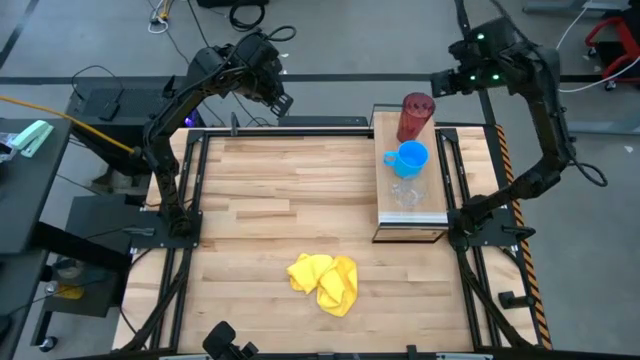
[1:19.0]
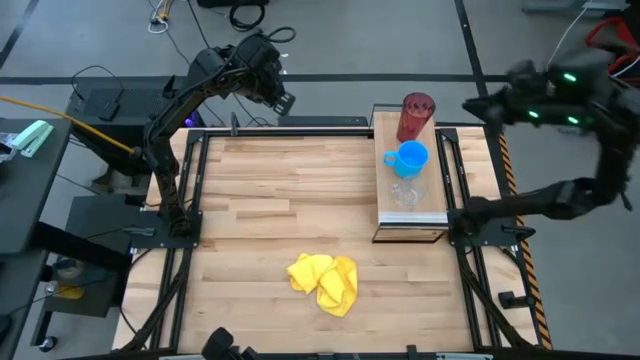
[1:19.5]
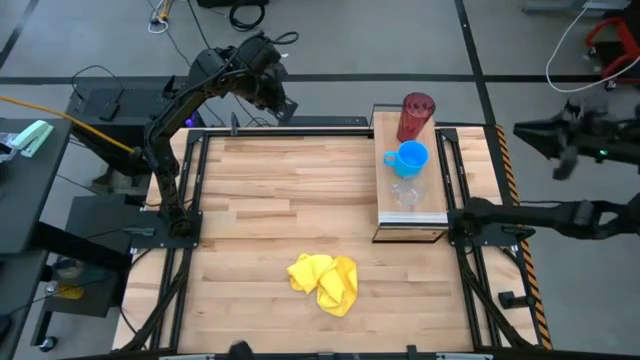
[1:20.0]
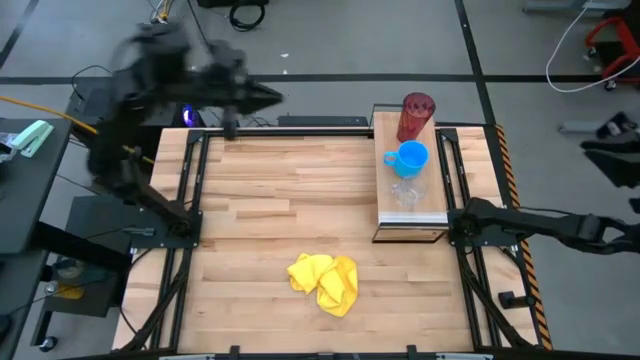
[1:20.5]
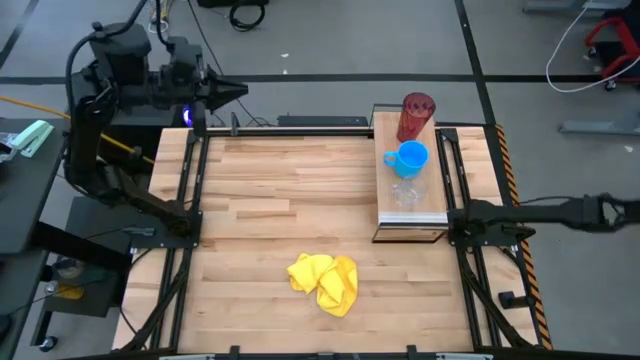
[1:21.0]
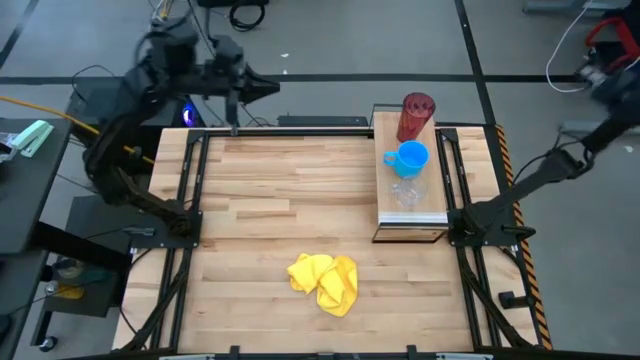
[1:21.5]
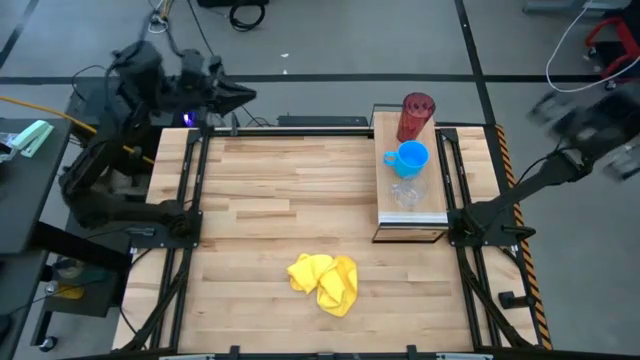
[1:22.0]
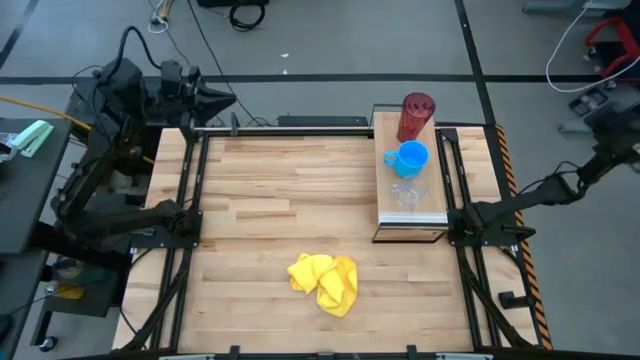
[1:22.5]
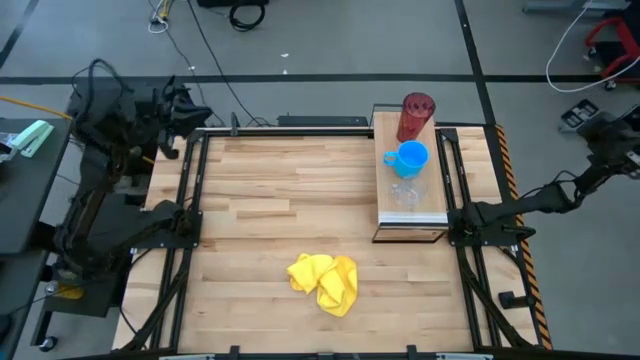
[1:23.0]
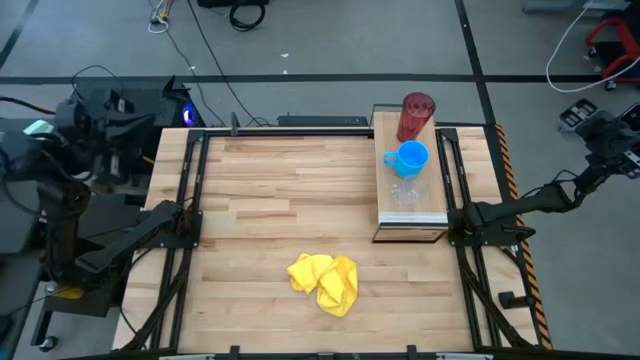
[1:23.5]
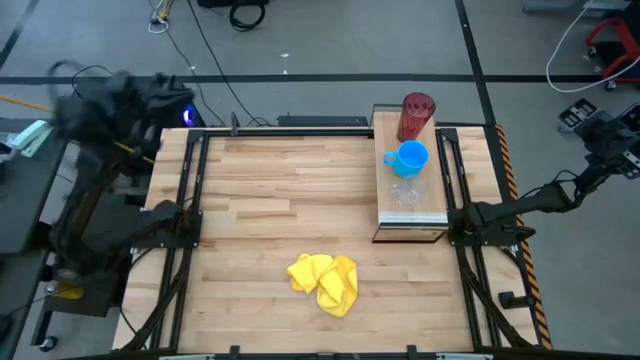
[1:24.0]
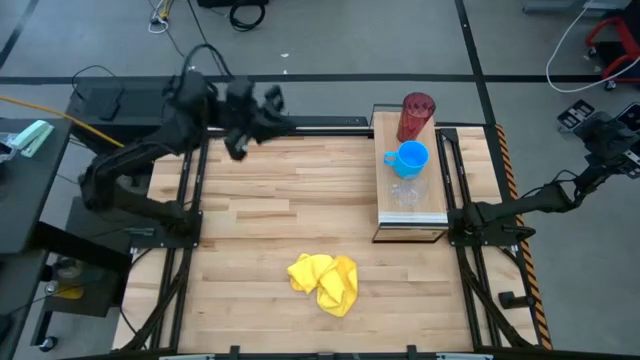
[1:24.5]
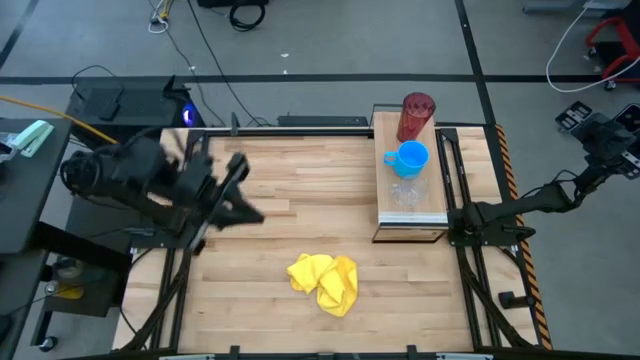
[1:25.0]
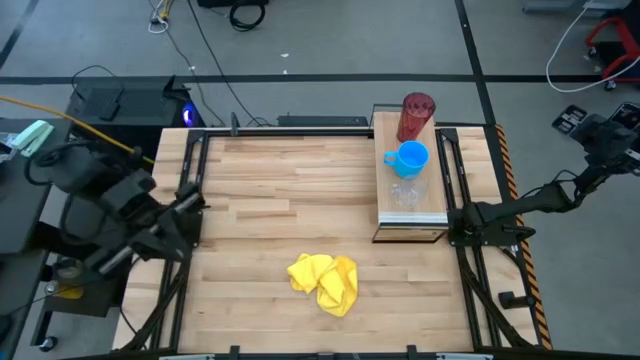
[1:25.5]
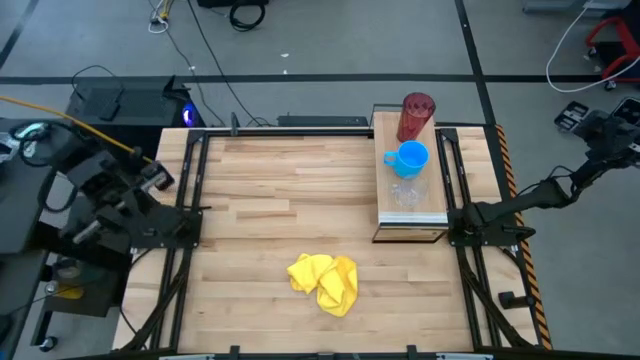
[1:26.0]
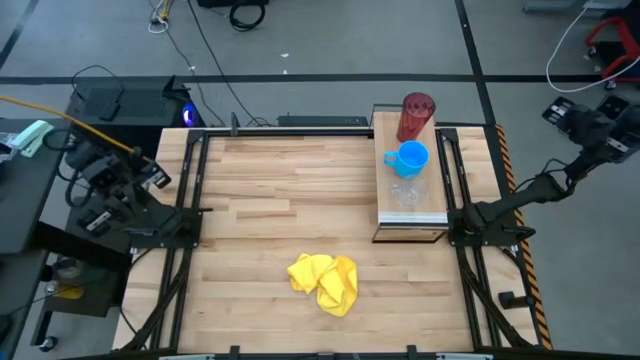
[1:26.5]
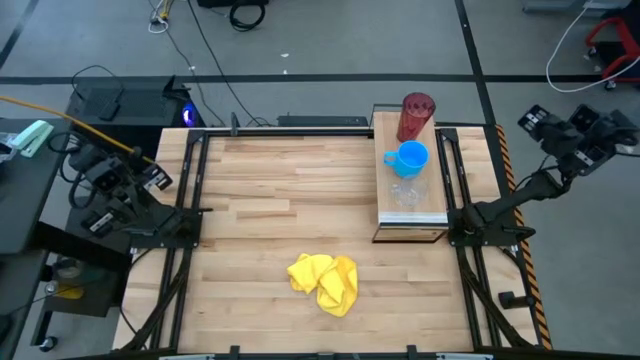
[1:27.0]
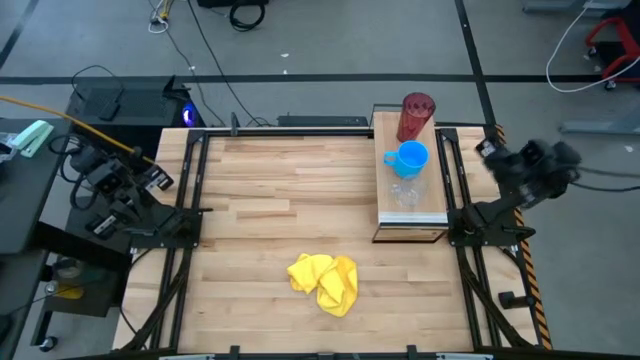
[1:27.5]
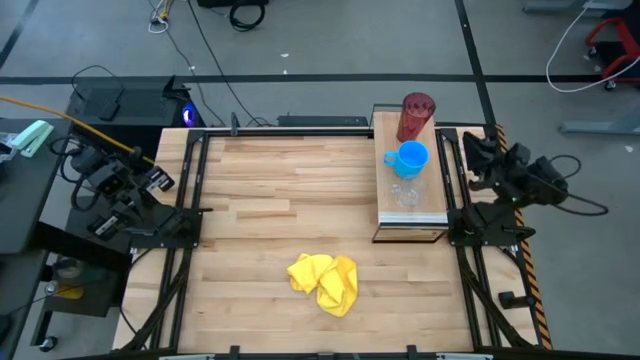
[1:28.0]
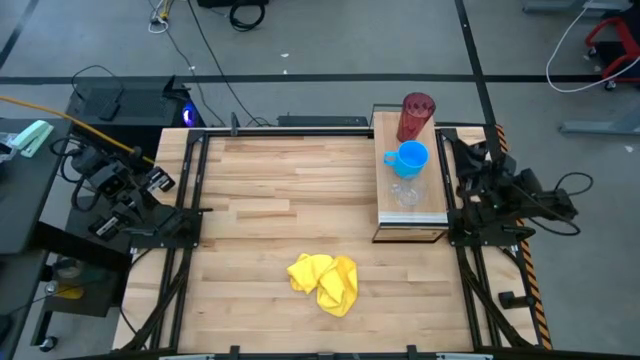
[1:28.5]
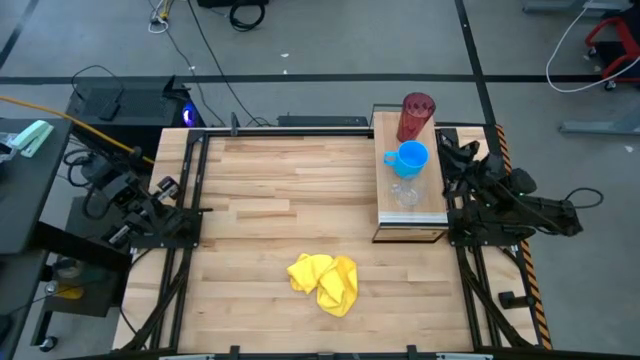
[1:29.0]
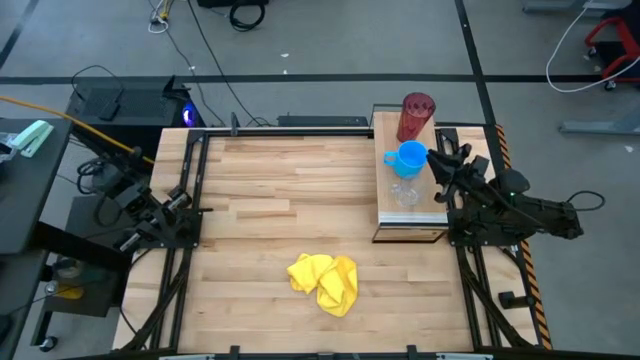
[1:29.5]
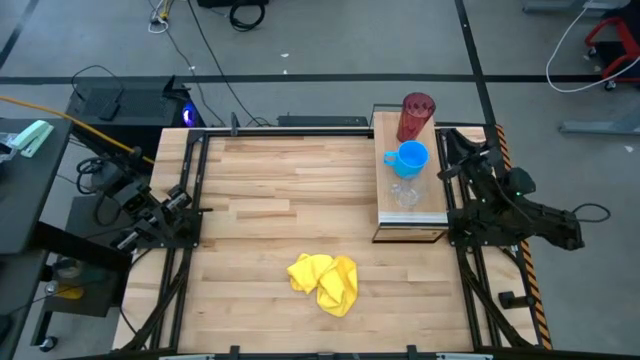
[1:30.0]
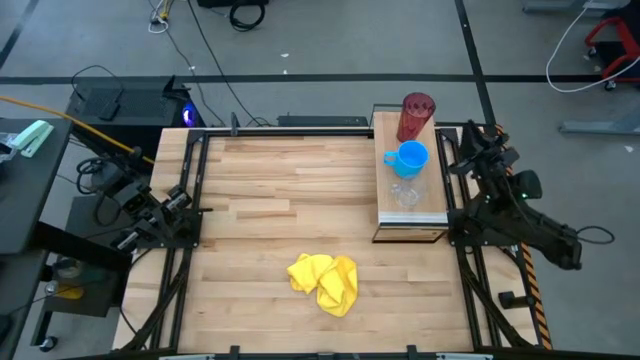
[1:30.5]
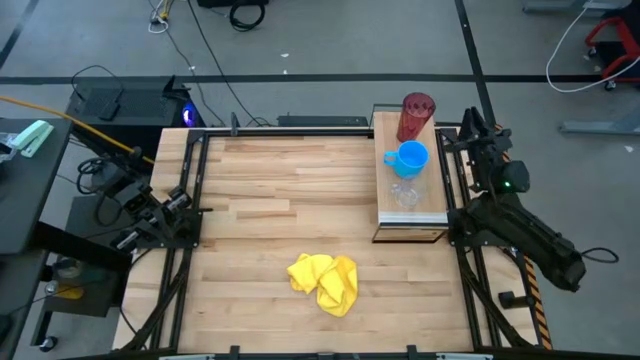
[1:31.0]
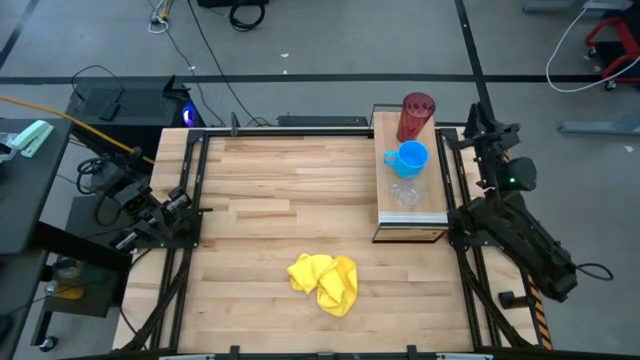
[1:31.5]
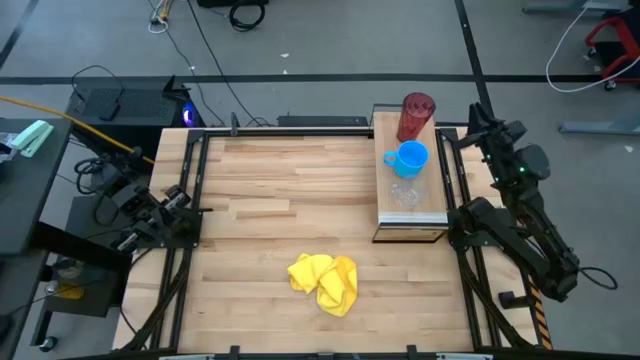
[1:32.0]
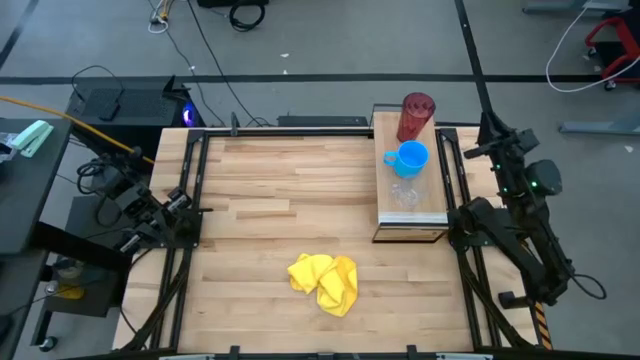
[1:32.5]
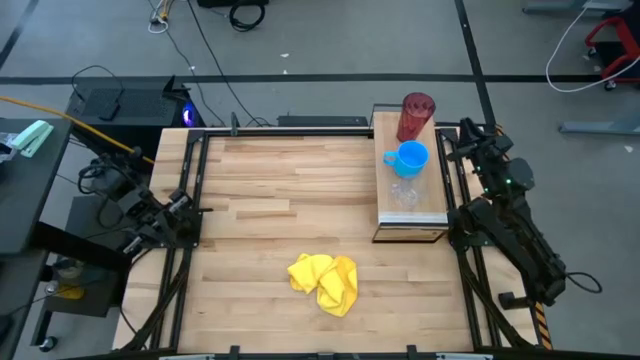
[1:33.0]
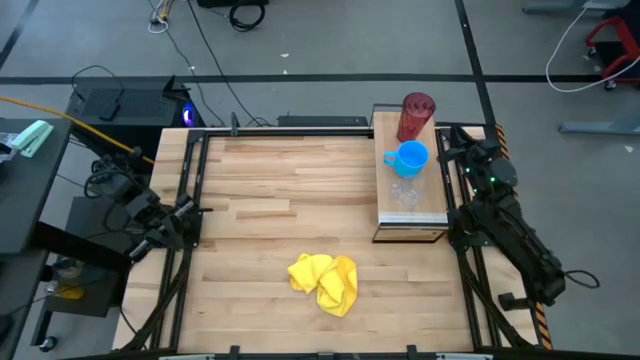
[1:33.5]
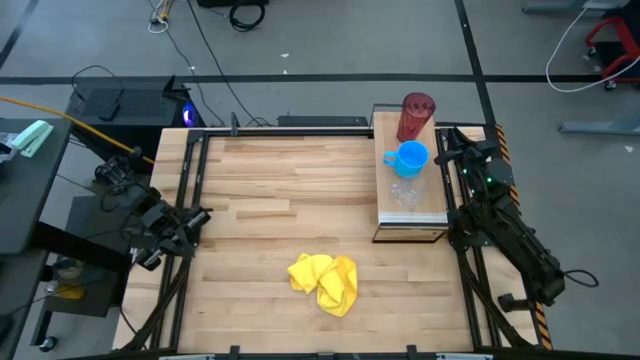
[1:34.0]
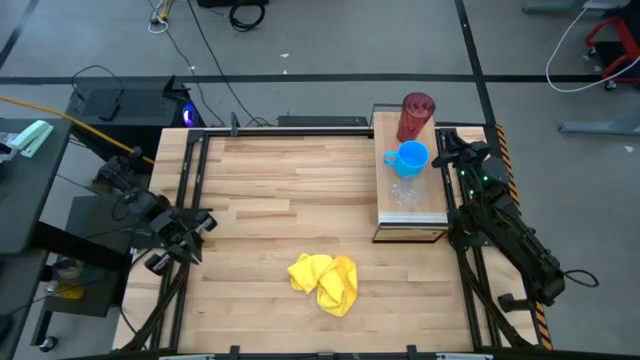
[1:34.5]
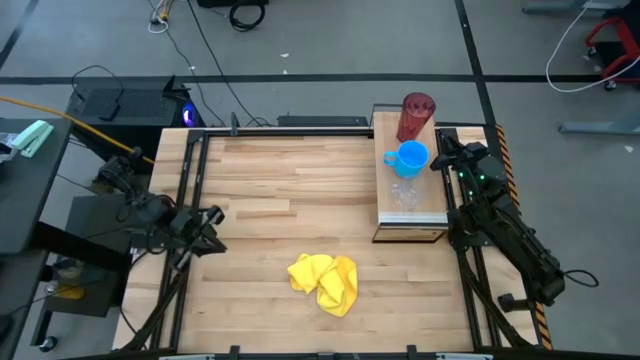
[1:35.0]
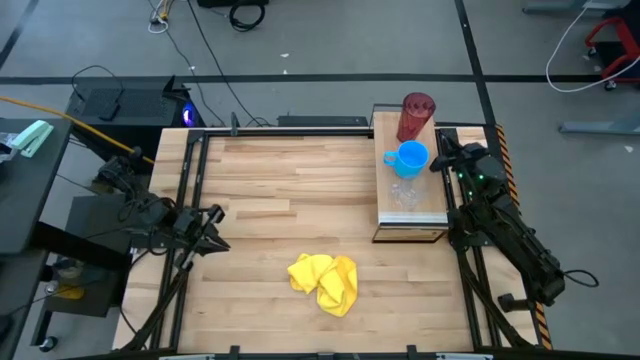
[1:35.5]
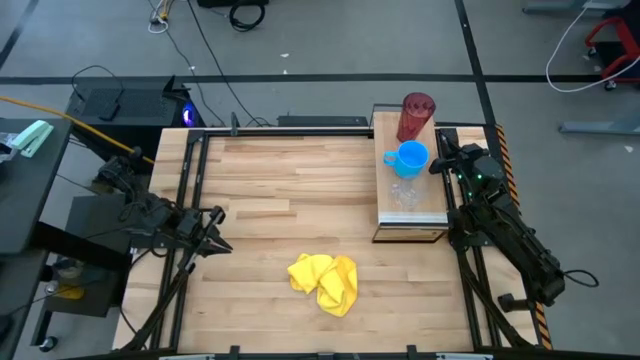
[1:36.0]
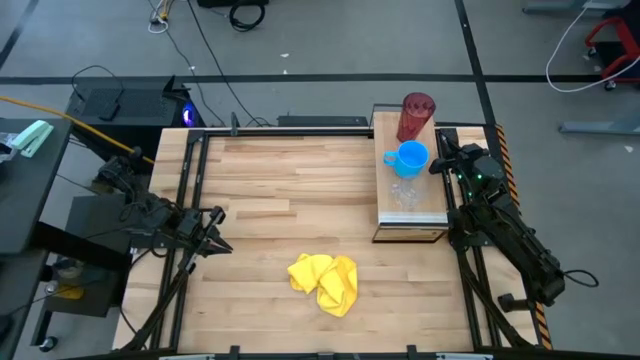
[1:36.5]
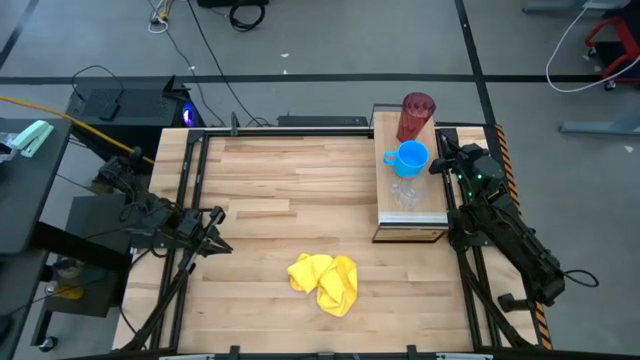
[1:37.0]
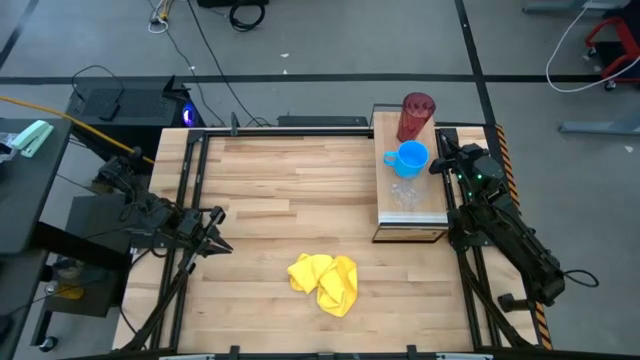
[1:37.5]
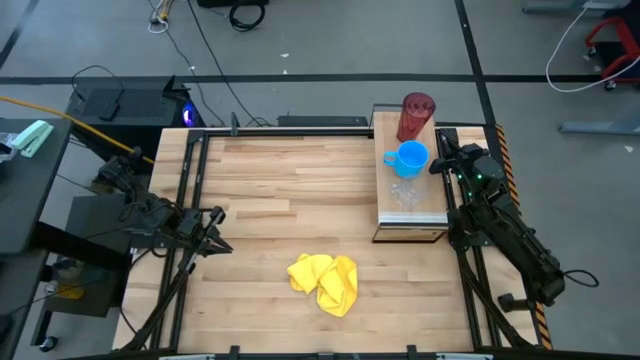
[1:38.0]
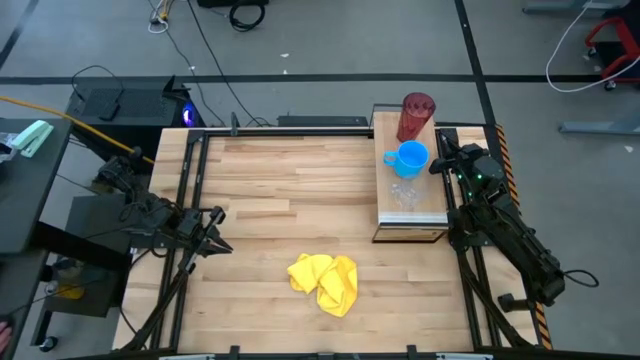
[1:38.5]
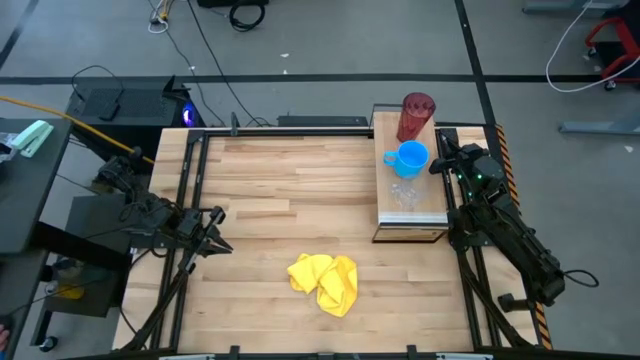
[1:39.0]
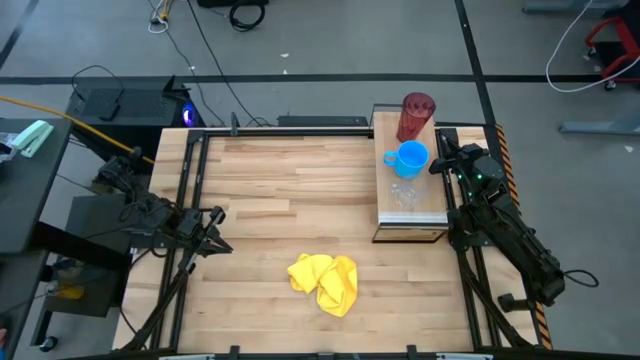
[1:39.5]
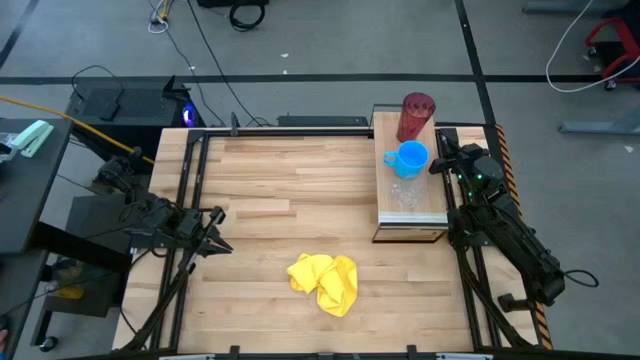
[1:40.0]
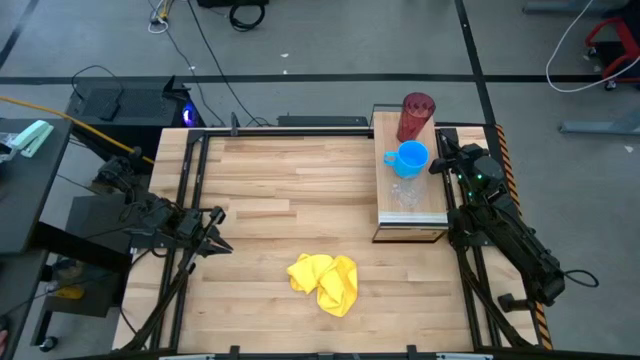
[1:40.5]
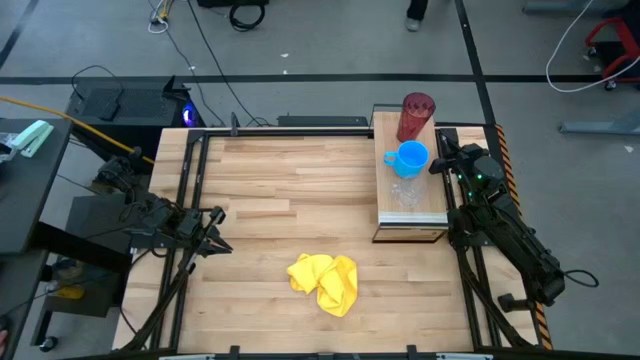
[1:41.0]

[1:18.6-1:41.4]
Task: Stack small to large cups/mugs on shelf
Return to Home Position
